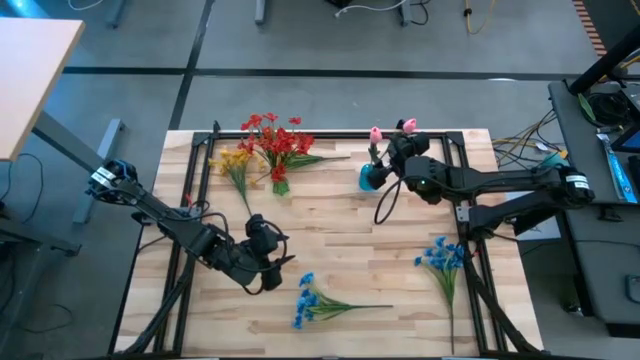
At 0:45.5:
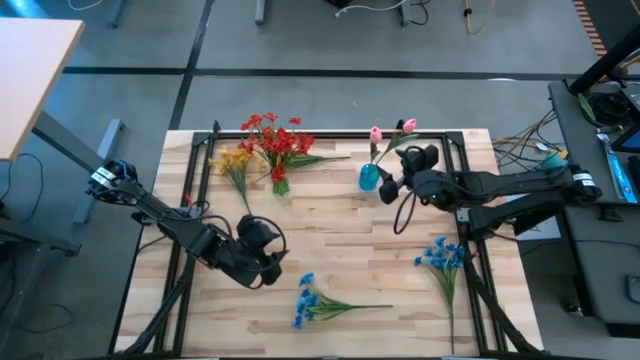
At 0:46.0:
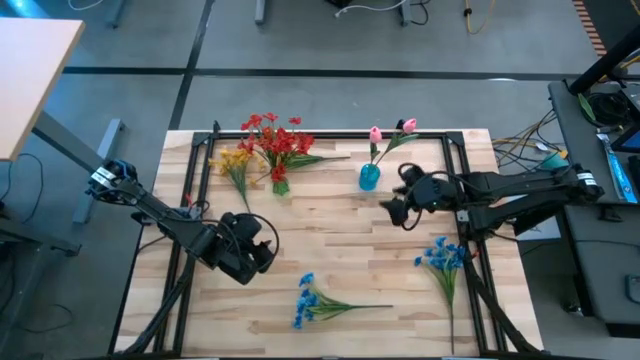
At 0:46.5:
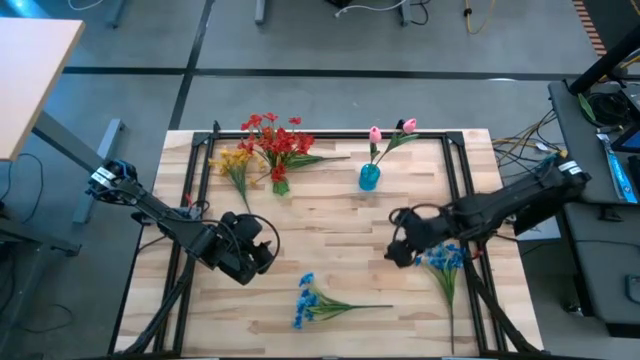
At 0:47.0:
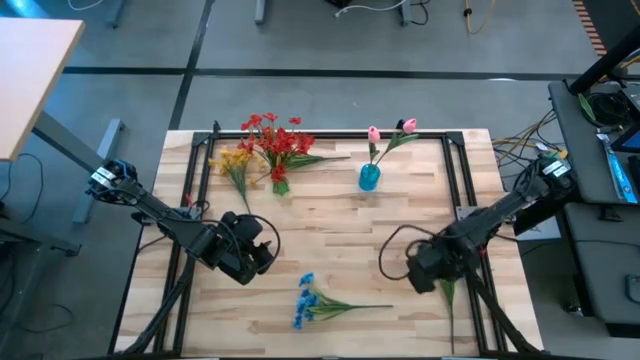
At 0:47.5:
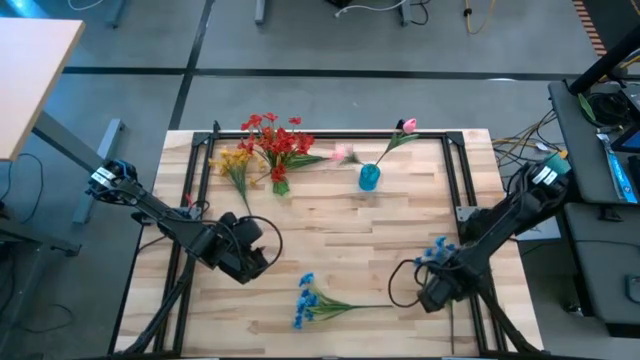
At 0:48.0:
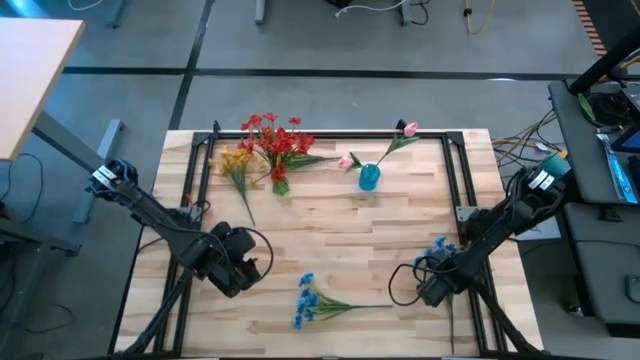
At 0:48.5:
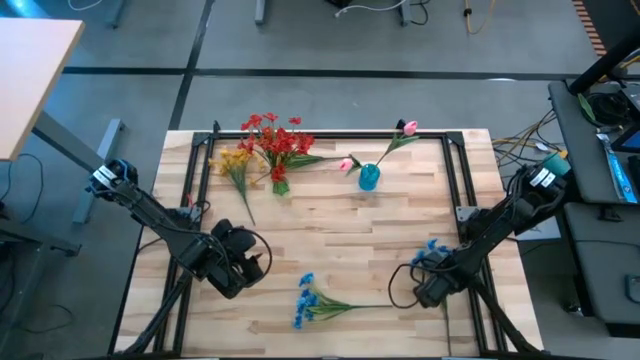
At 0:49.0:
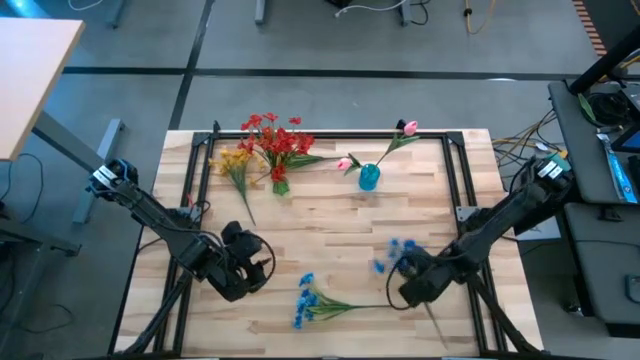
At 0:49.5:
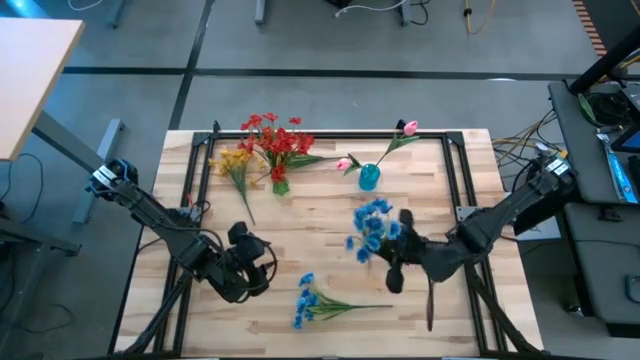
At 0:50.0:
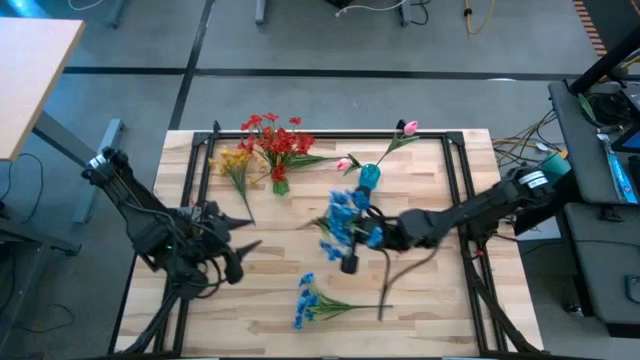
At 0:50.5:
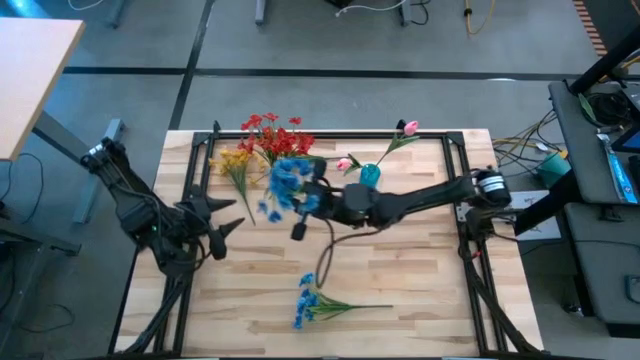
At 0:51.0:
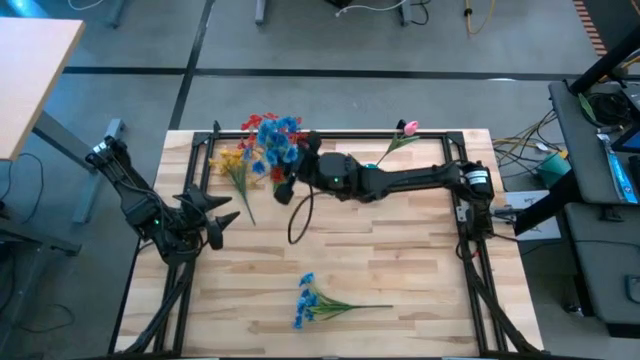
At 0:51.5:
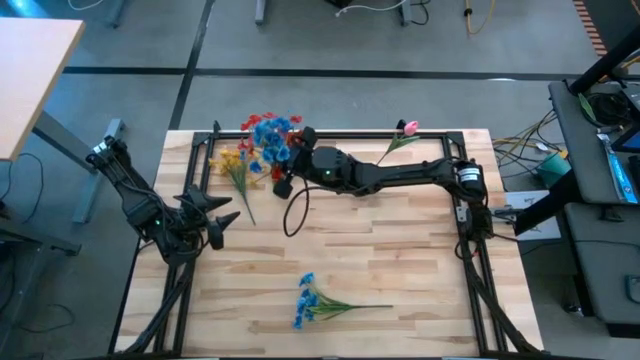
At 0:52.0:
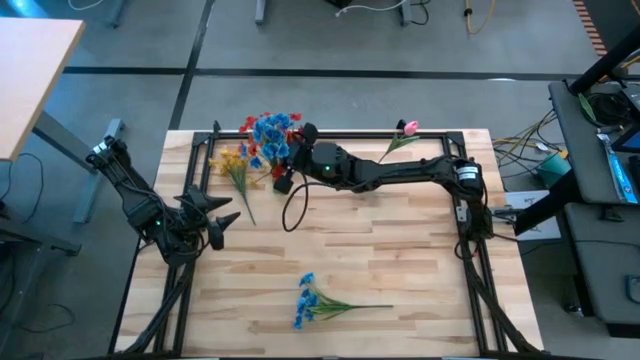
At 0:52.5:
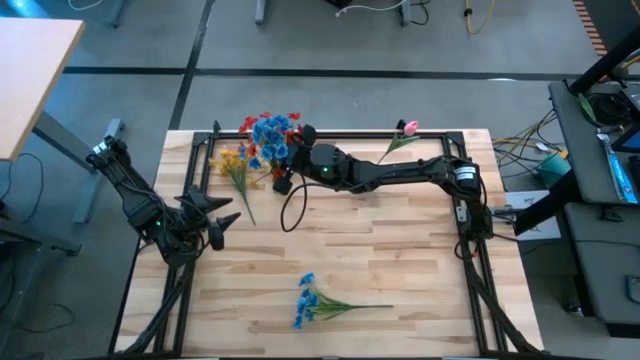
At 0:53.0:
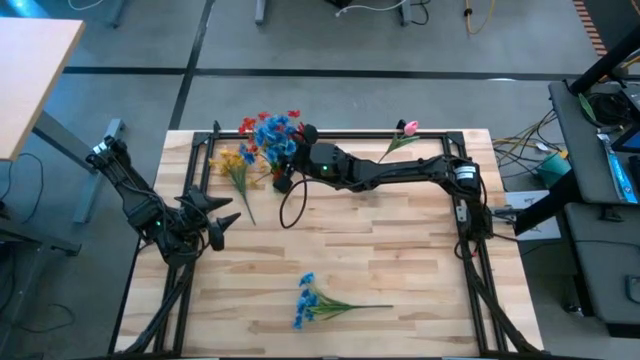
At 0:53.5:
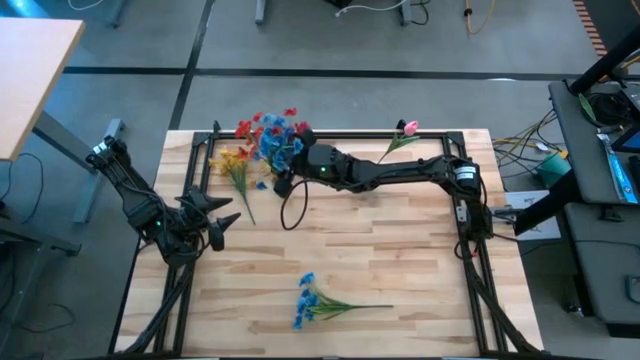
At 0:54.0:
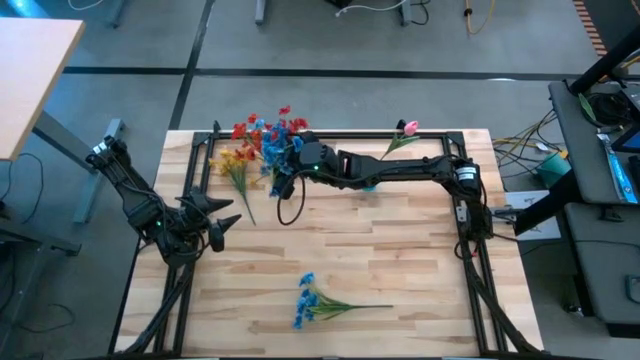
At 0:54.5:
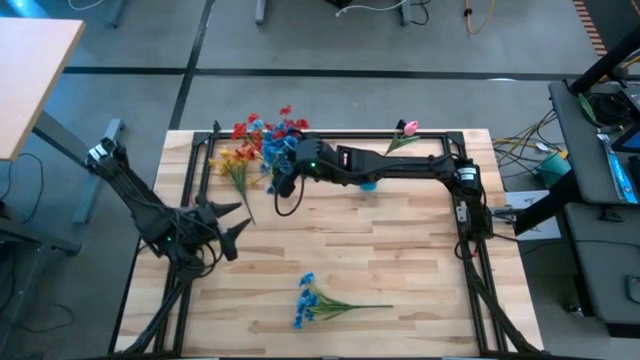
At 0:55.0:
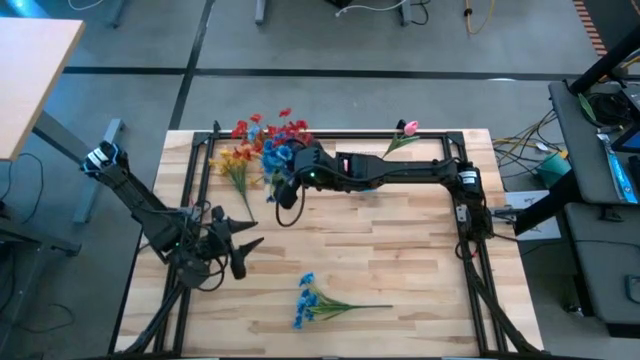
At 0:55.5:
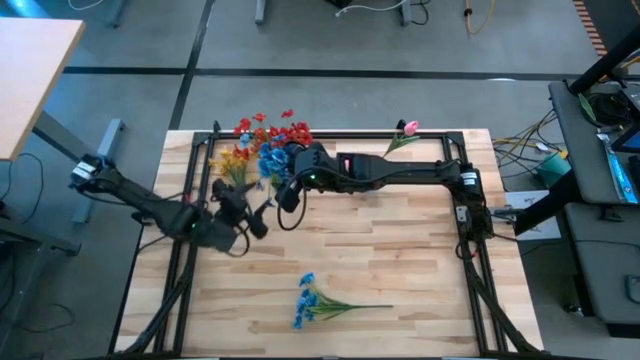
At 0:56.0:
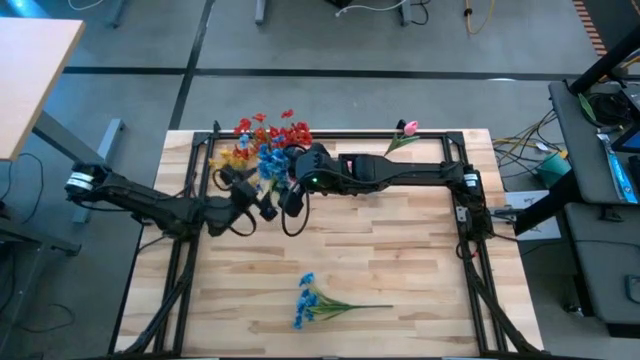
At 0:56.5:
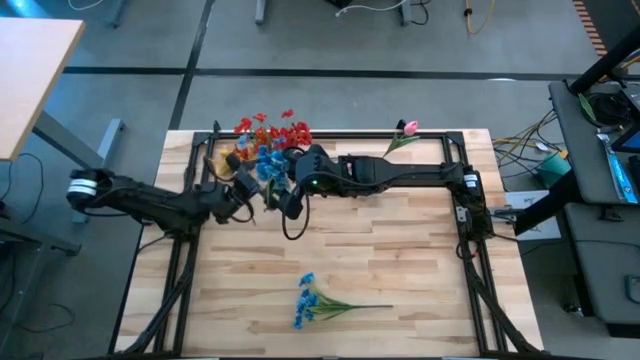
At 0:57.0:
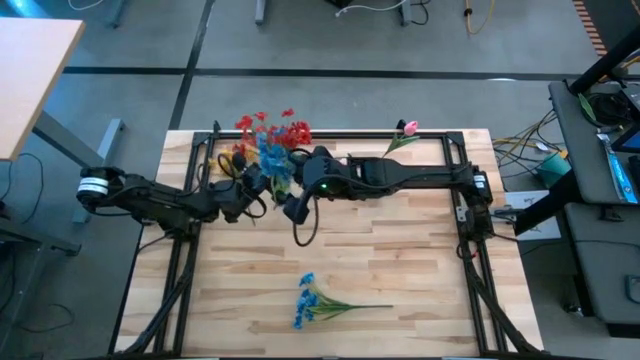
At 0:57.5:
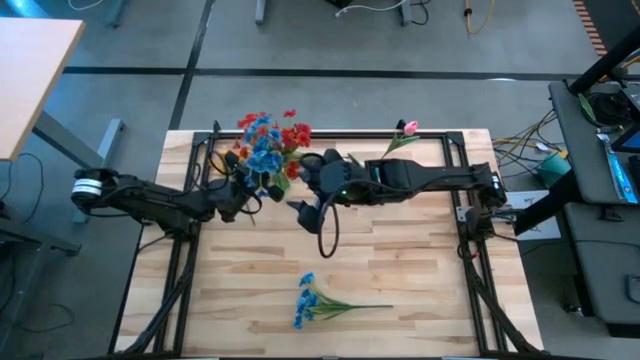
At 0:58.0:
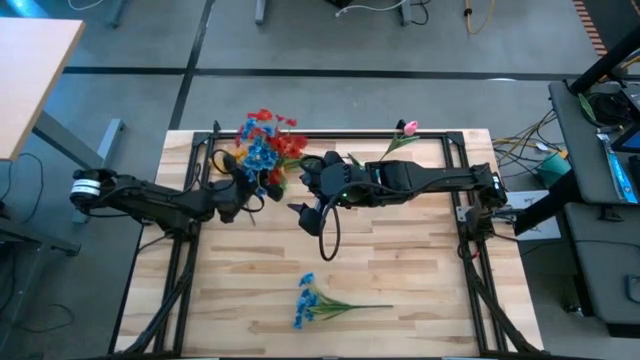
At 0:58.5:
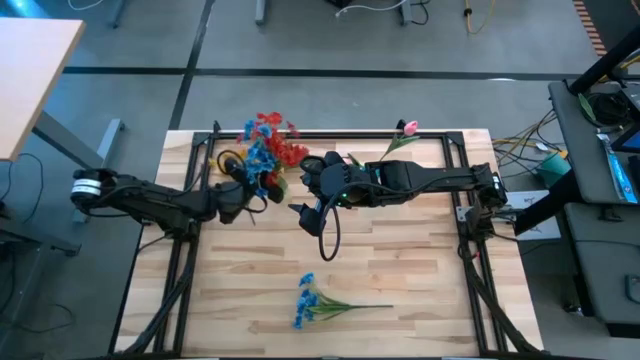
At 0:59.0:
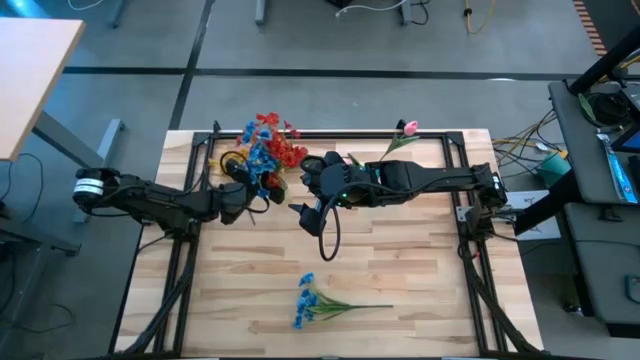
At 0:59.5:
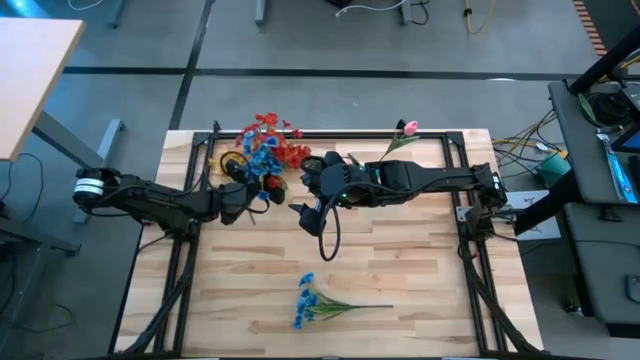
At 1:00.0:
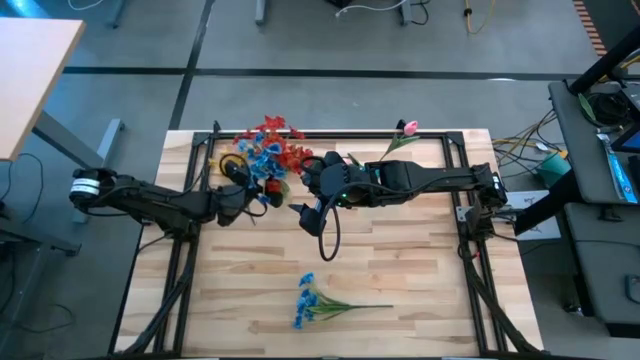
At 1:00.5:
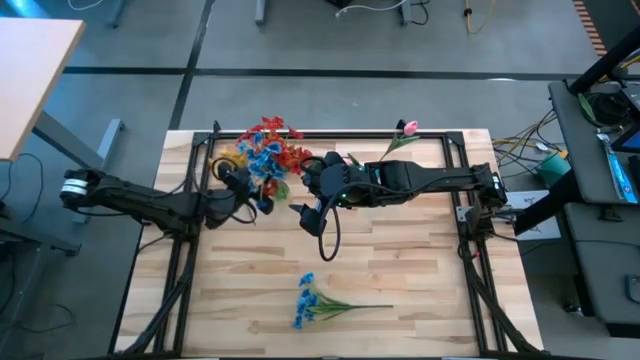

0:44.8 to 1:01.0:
Task: Sort flowers into vase by color
Put the right blue flowers into the green vase

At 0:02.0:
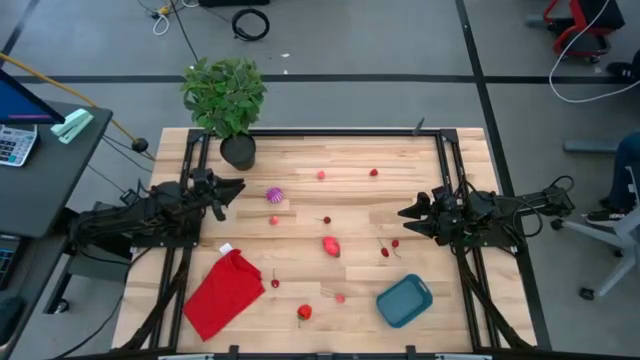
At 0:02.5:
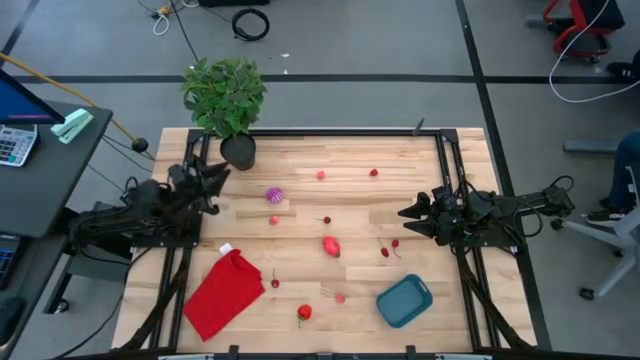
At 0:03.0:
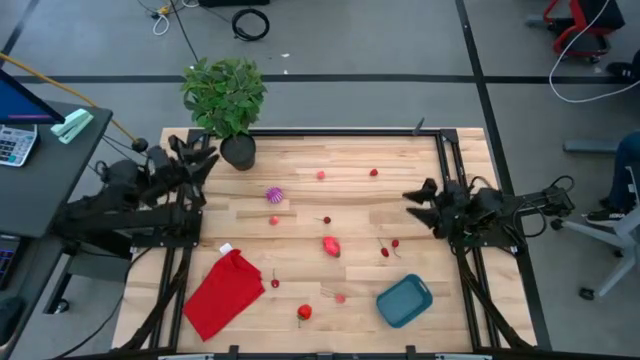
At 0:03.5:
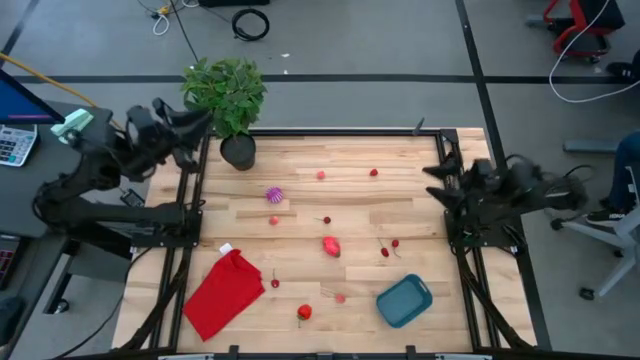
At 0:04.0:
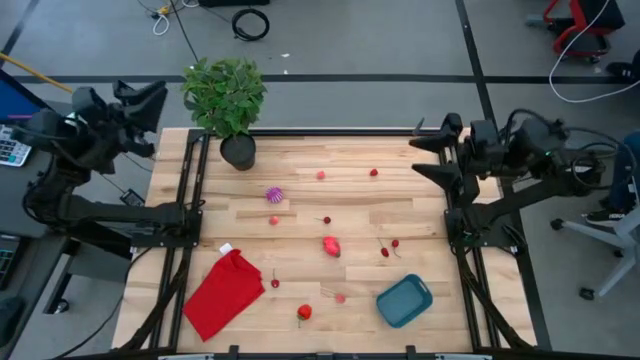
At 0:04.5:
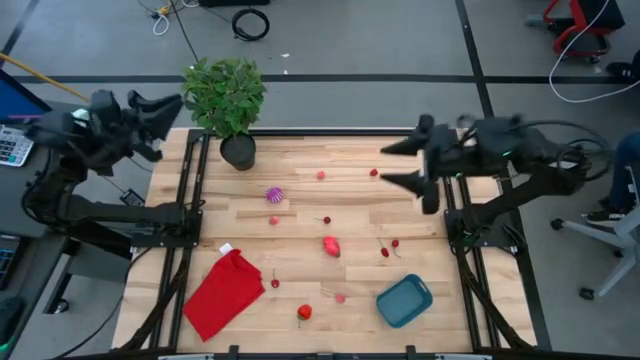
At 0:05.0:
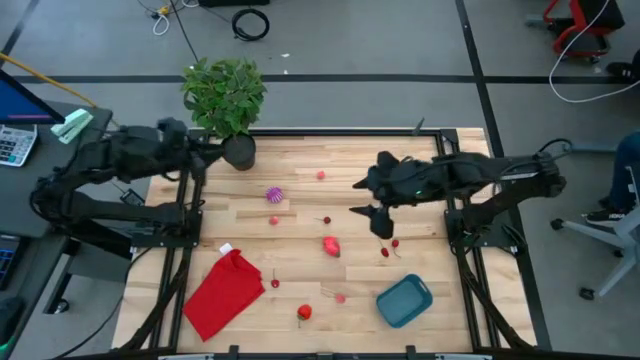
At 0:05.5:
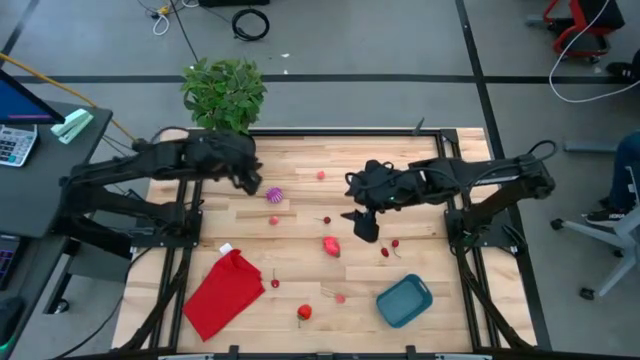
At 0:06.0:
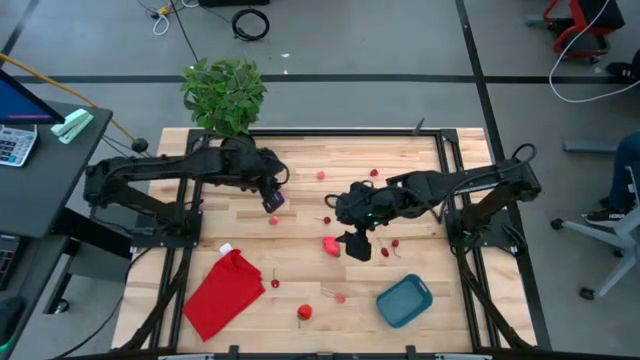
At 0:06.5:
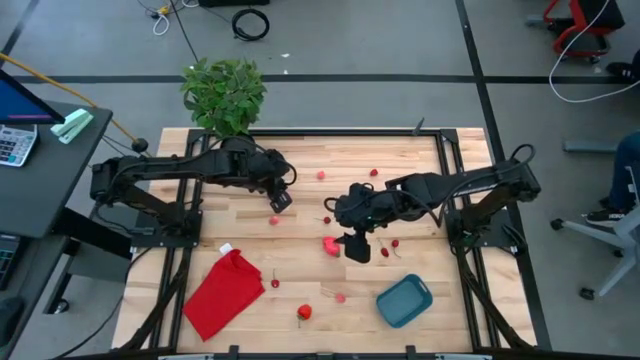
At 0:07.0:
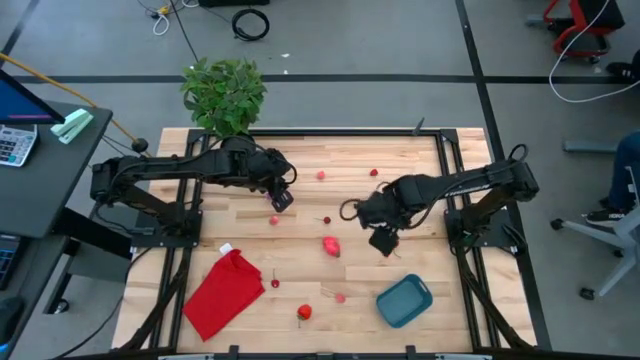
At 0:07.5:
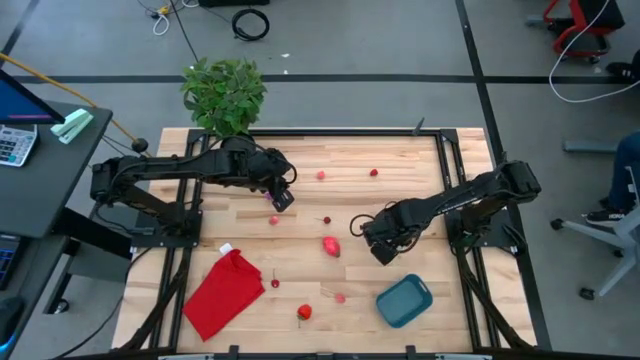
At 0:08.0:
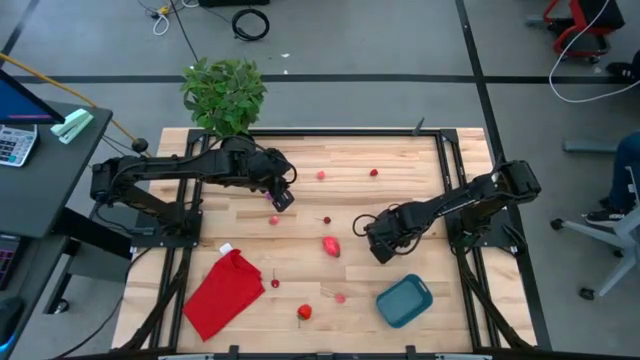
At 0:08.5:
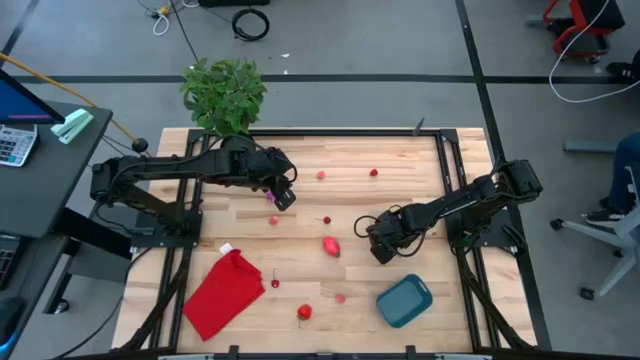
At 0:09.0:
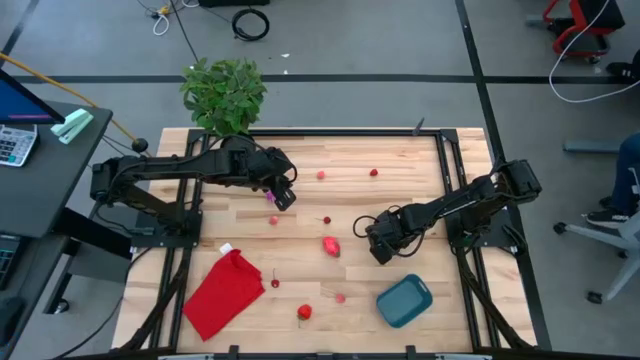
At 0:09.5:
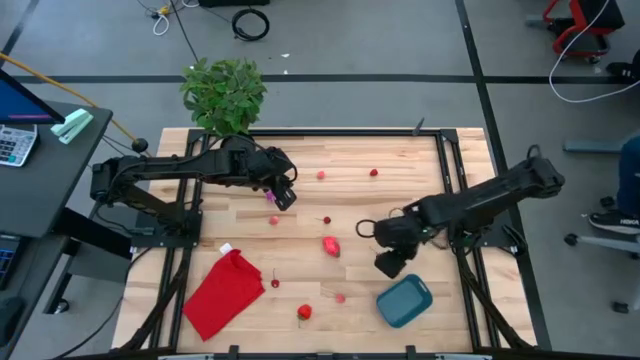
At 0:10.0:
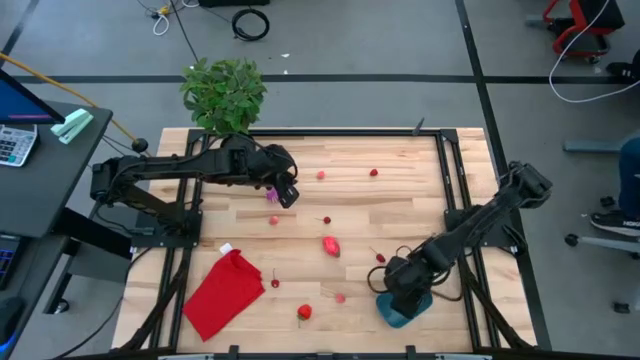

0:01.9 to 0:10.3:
Task: Pick and placing Produce into tupperware
Put the cherry into the bin
